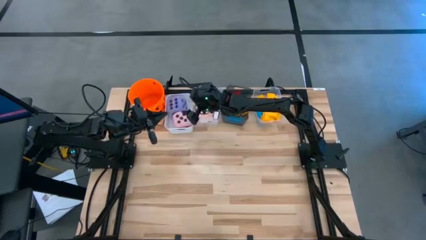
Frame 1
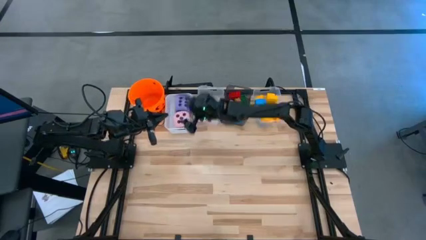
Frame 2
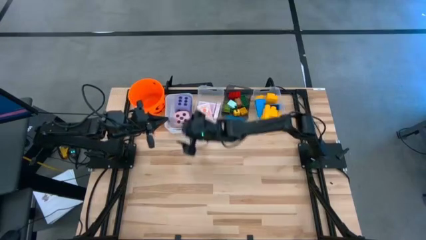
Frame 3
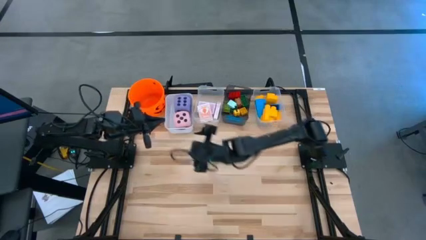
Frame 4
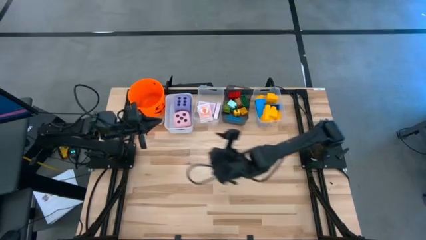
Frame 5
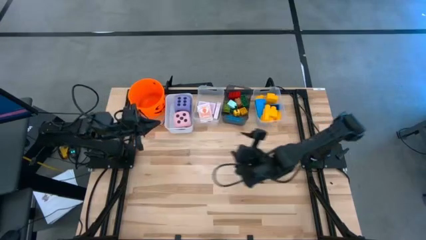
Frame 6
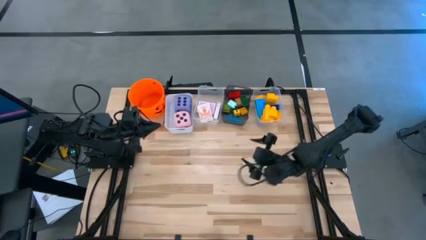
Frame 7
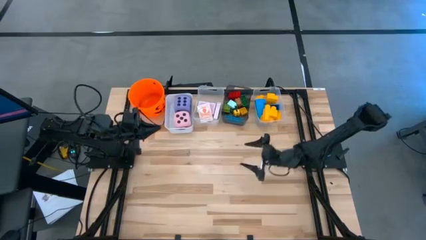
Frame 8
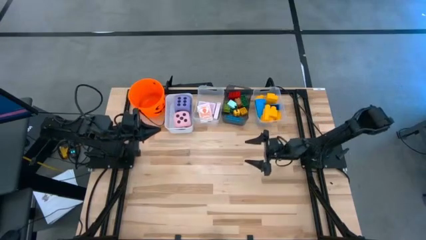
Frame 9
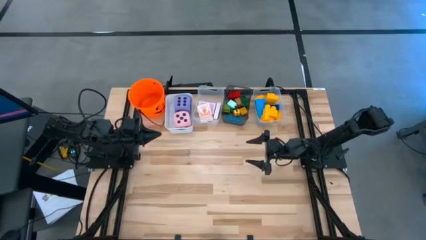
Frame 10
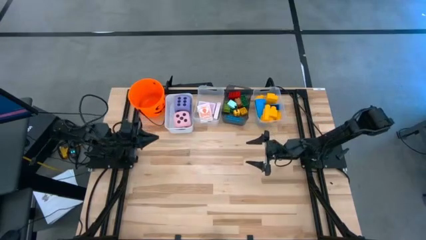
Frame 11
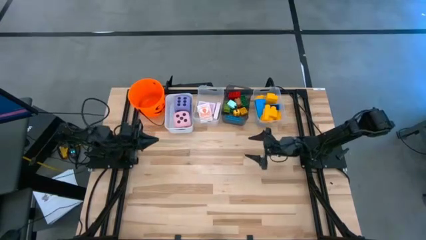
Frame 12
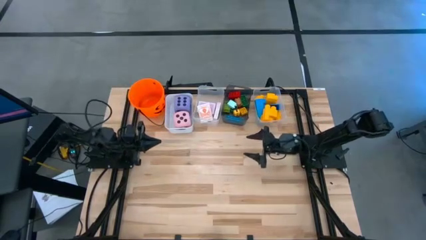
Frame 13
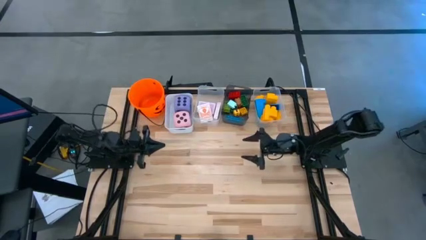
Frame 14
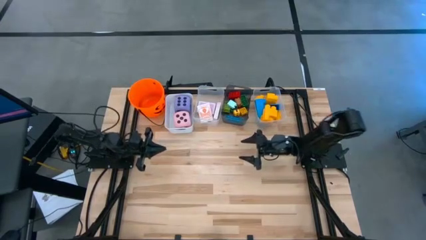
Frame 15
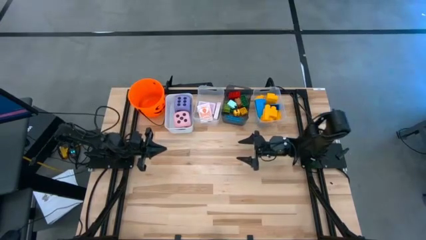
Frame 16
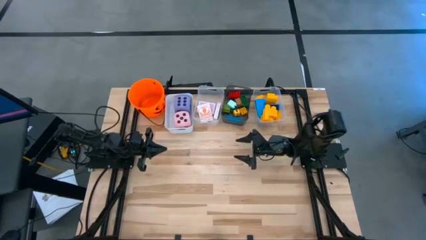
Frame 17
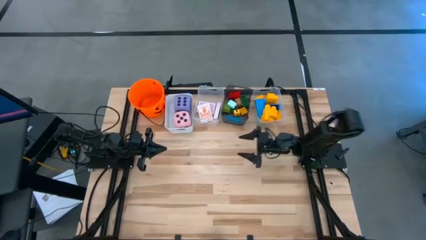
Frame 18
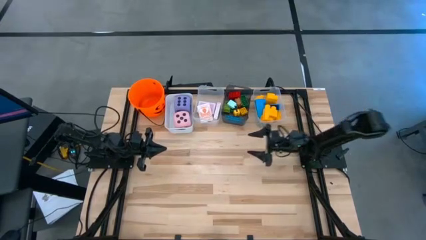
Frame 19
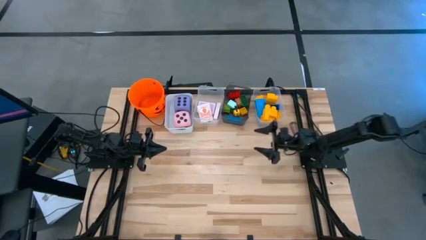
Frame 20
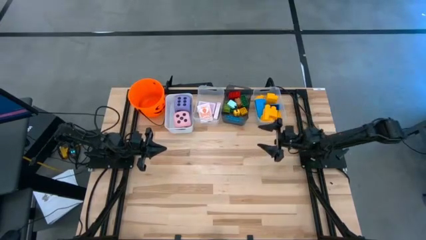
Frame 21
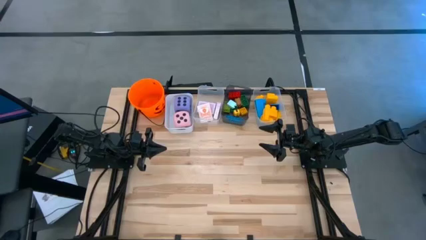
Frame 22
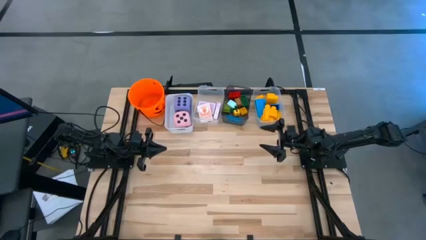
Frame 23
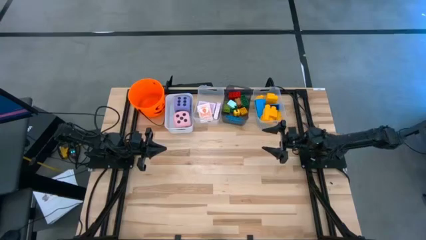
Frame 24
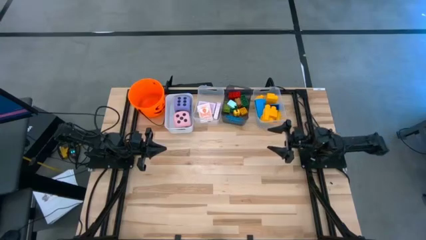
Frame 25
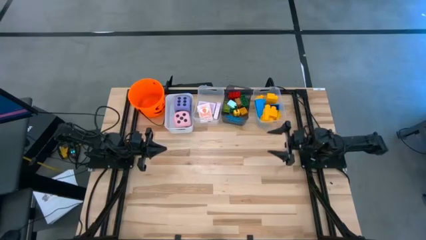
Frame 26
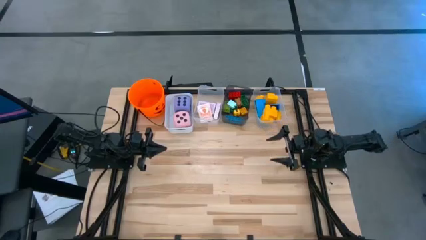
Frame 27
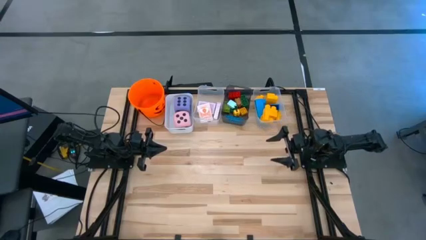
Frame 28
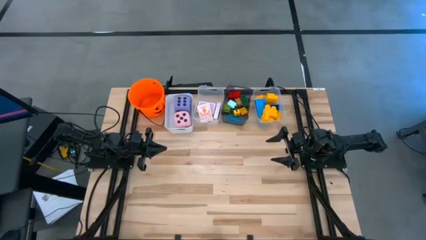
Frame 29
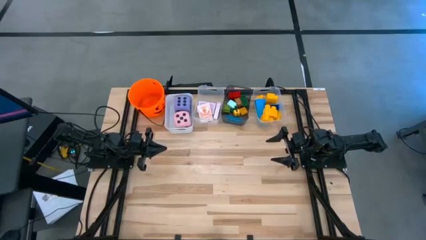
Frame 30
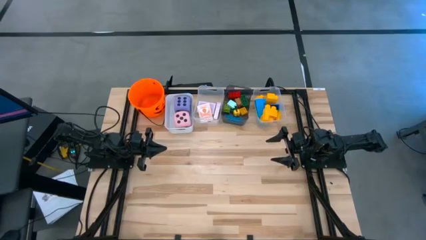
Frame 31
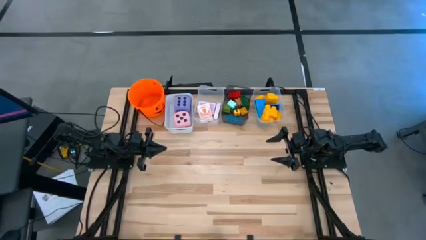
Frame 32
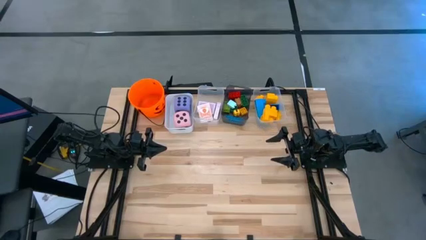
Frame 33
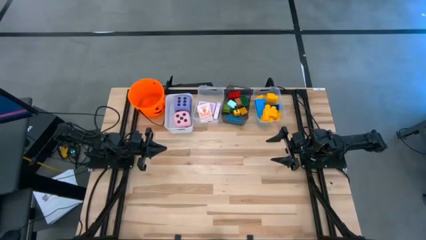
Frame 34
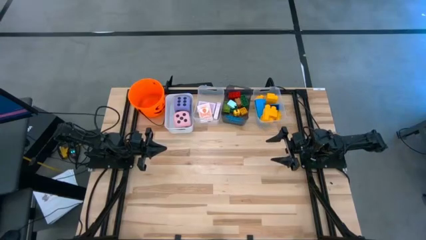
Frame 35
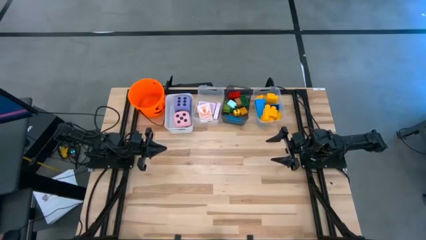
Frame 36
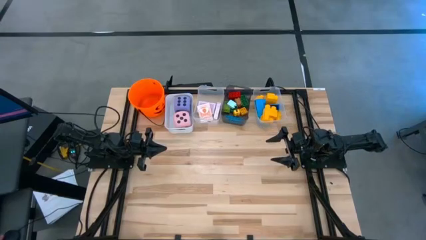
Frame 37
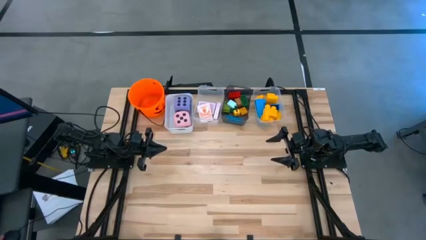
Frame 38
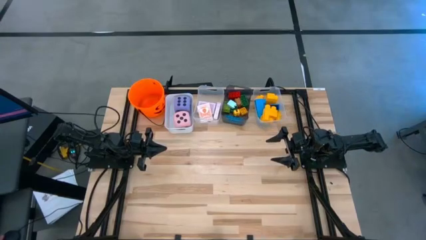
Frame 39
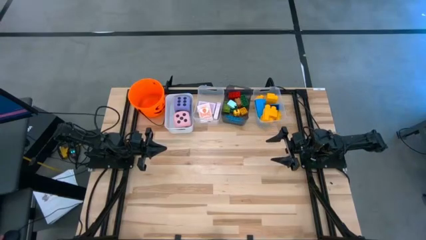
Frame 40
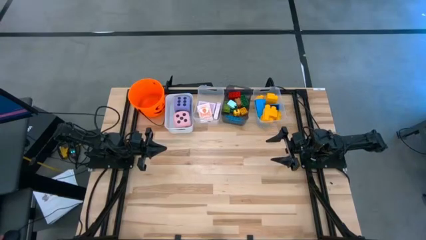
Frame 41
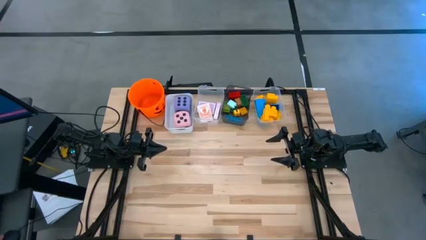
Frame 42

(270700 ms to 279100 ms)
Task: Pick & Place Toys
Return to Home Position
